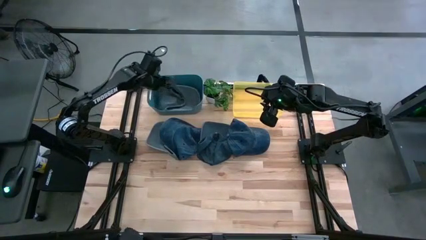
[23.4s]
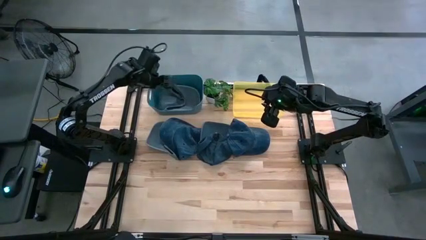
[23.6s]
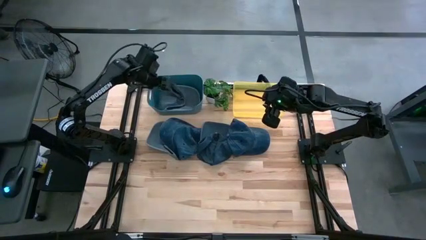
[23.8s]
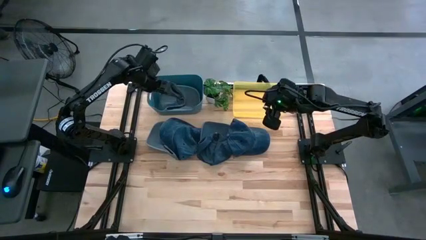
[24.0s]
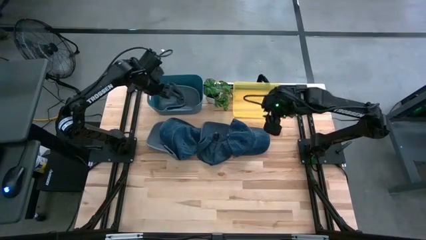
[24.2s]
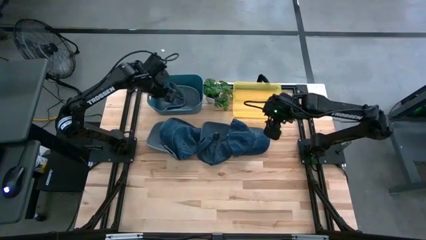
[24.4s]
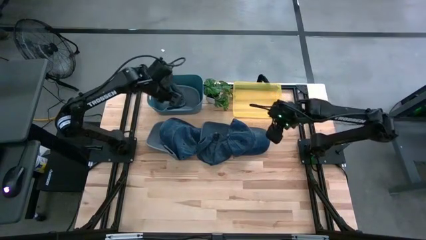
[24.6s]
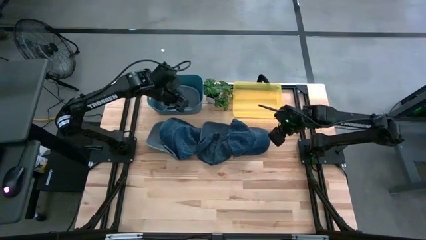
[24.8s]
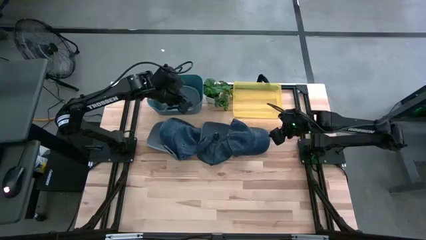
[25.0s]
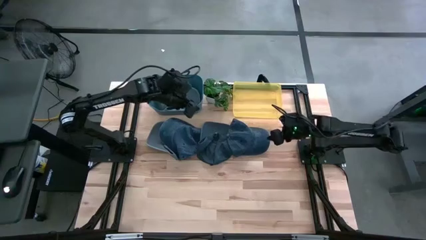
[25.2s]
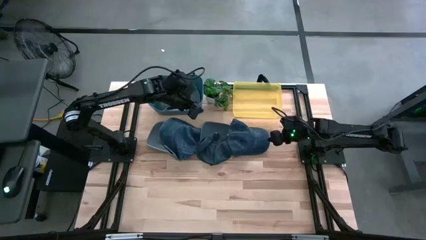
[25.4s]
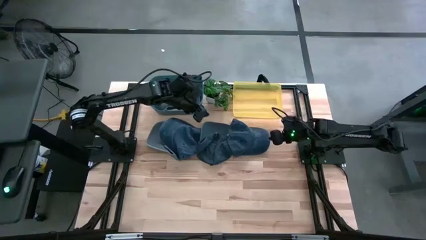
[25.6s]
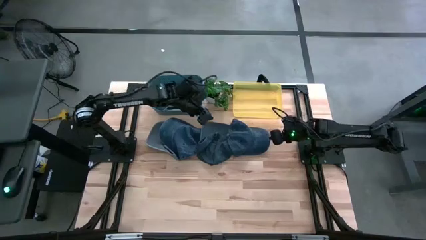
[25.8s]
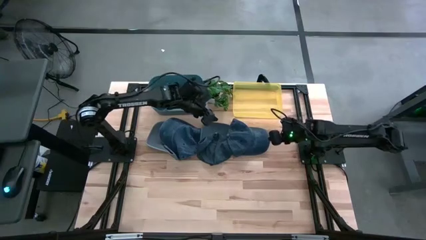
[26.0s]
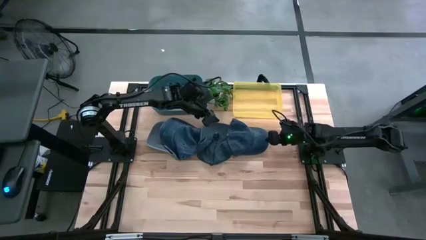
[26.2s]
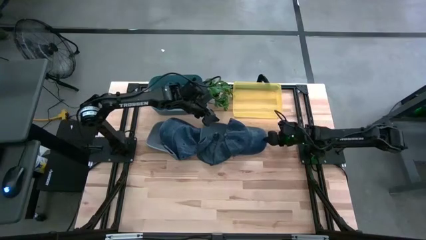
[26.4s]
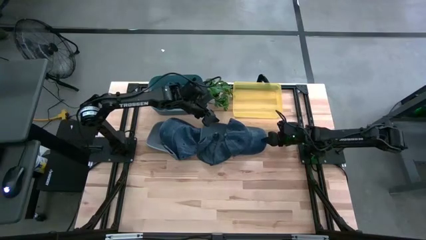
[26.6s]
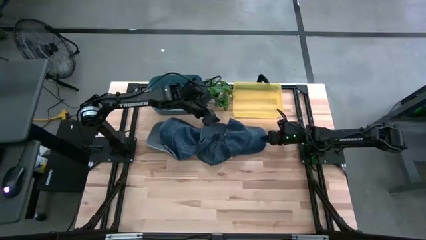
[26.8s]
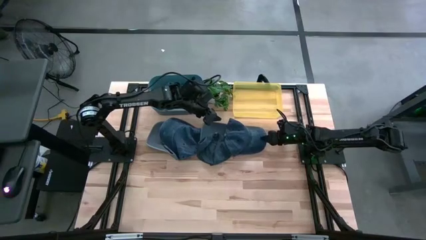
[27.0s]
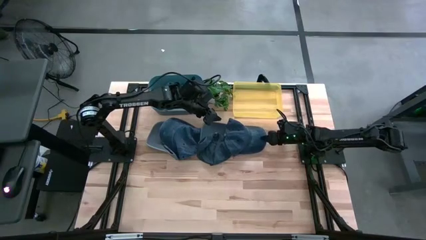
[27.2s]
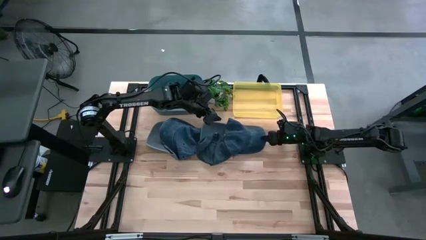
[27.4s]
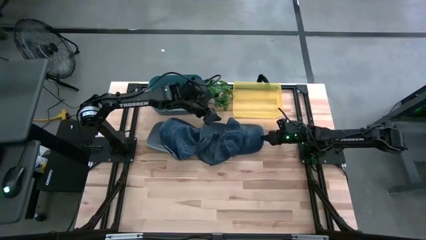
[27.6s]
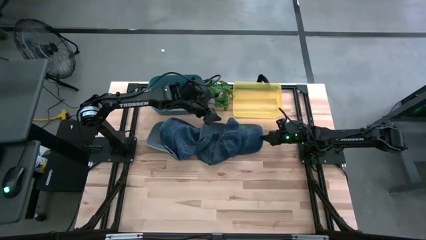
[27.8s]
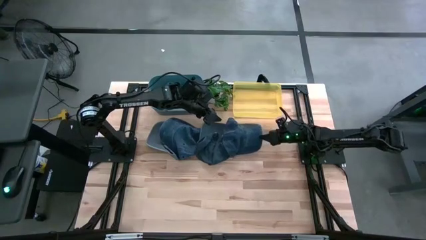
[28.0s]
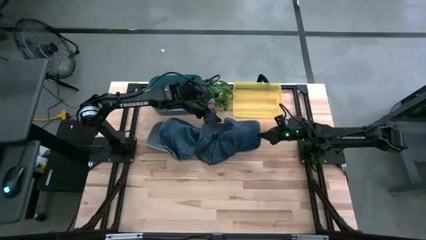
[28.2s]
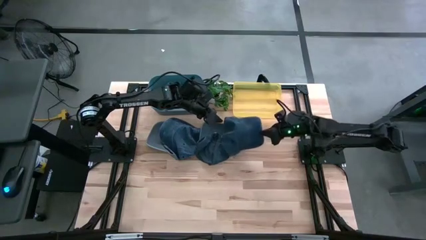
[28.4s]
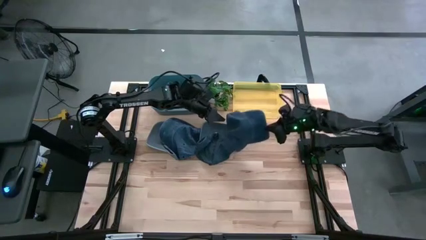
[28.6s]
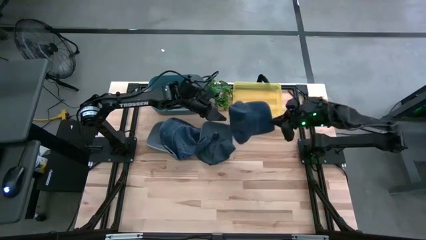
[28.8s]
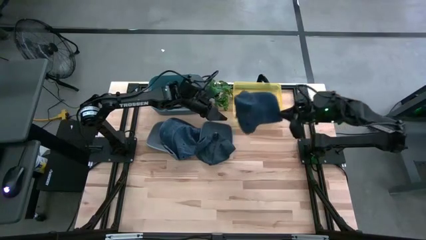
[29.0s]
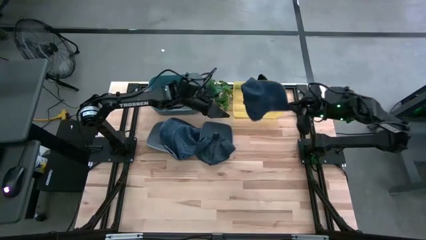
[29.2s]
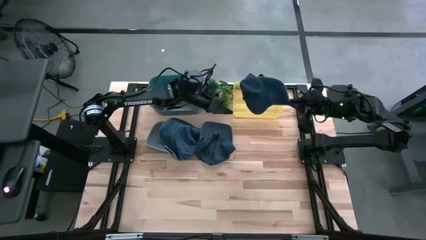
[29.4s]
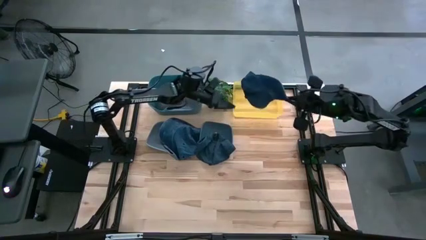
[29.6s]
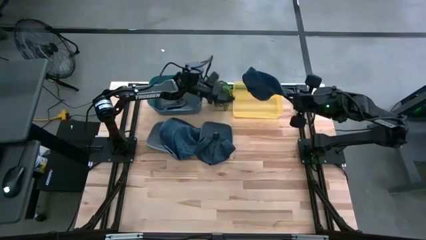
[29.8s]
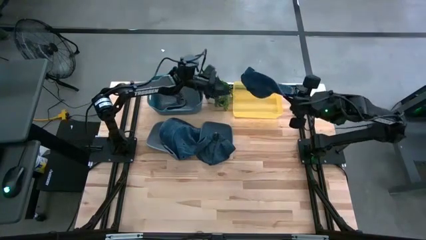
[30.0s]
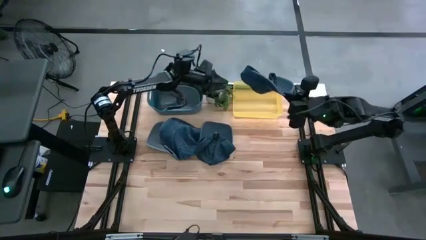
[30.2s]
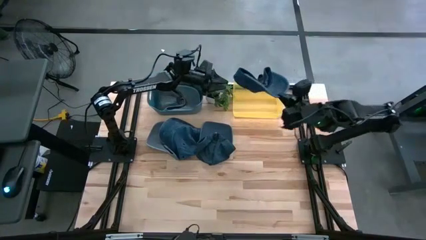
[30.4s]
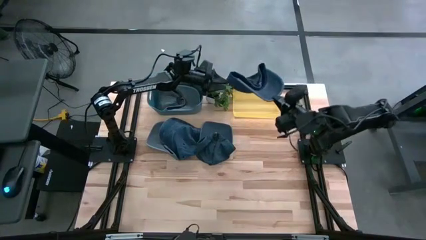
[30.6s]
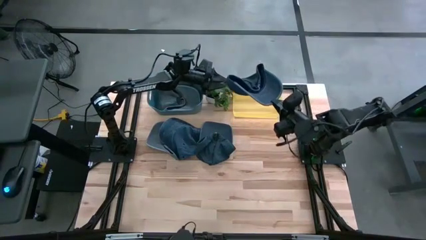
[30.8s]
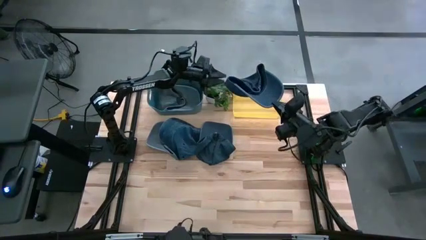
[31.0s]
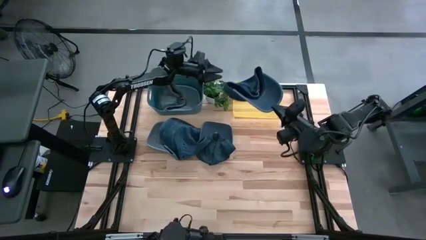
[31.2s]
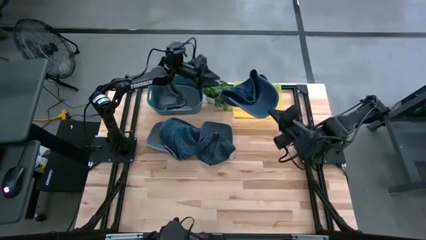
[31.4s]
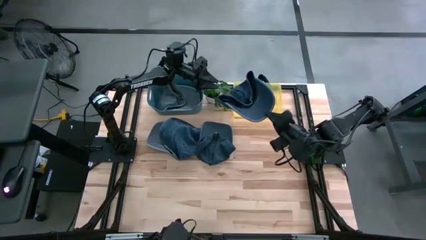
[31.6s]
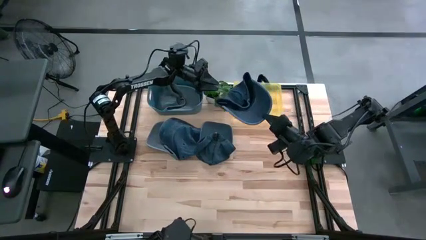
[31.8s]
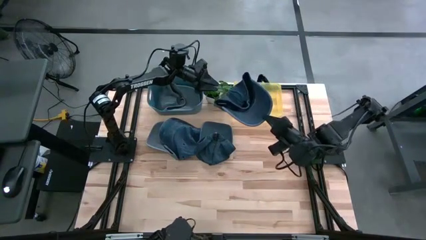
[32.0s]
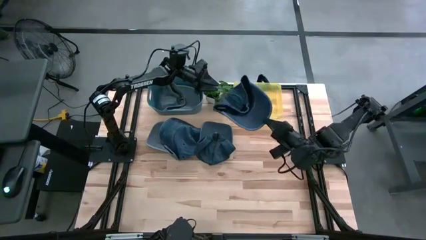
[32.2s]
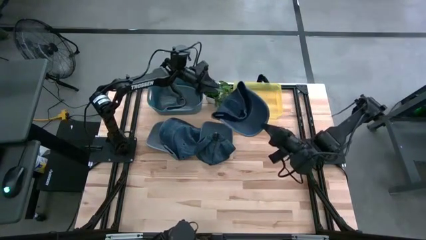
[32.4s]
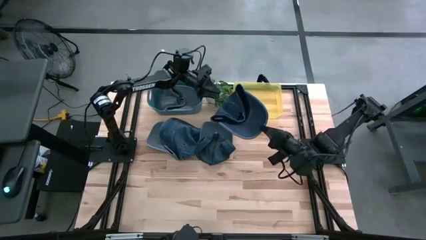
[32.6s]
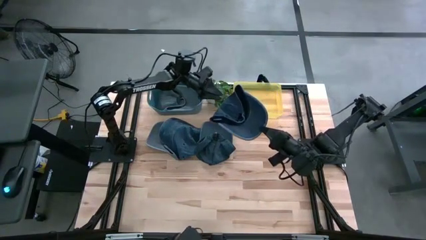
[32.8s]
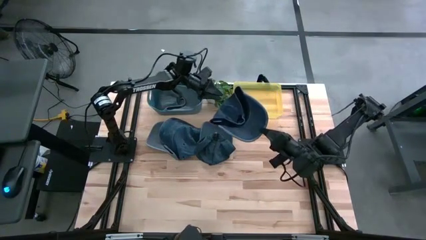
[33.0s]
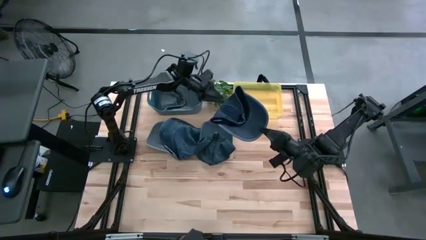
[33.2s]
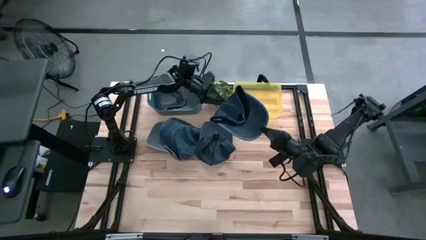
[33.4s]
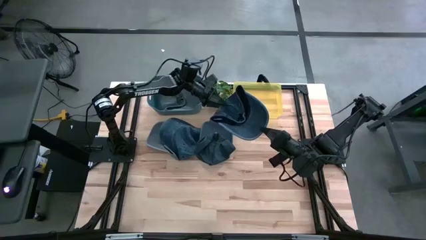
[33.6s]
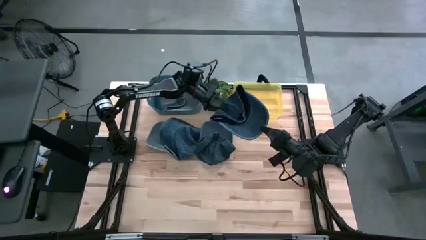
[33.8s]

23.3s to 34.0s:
Task: Pick & Place hat
Put the right blue cap into the yellow bin

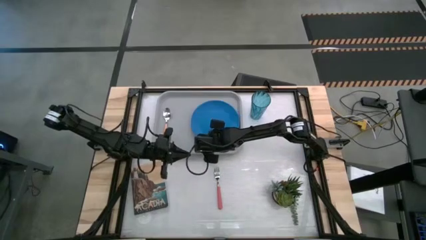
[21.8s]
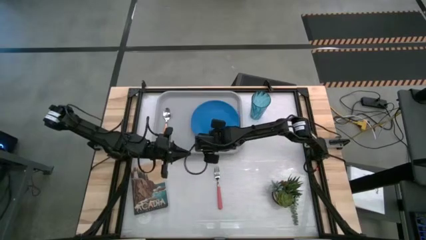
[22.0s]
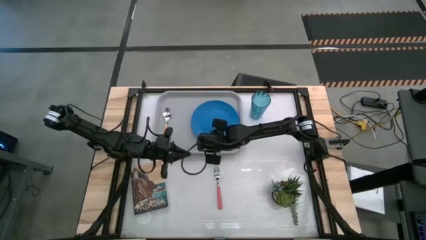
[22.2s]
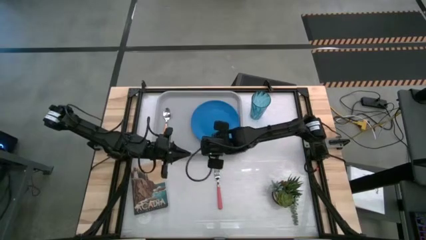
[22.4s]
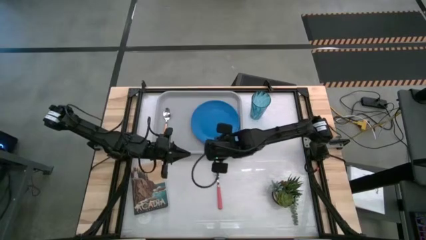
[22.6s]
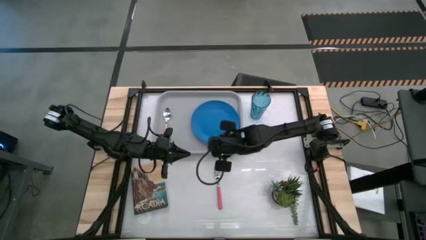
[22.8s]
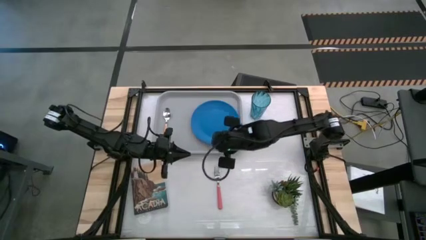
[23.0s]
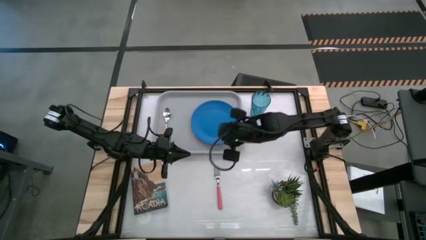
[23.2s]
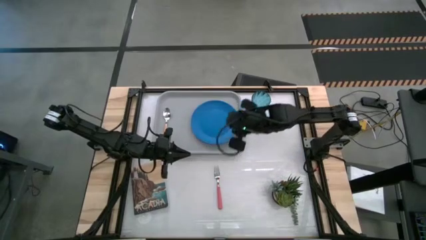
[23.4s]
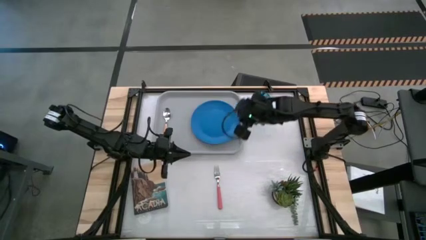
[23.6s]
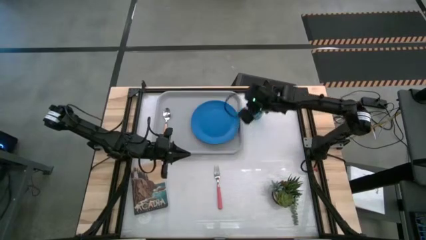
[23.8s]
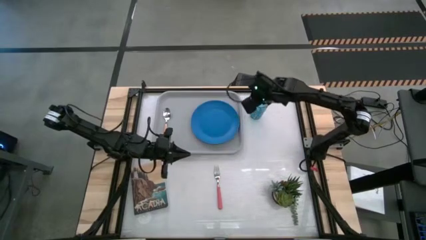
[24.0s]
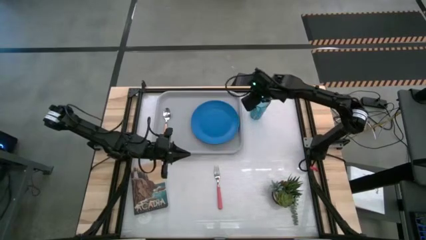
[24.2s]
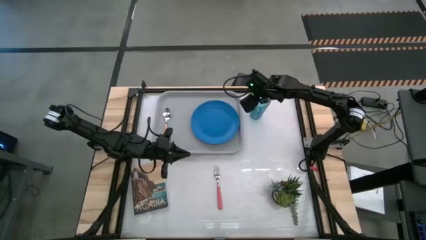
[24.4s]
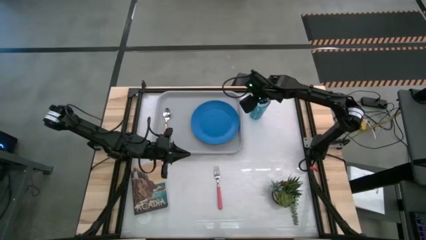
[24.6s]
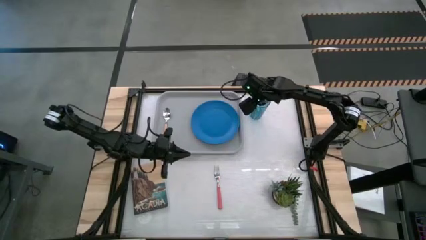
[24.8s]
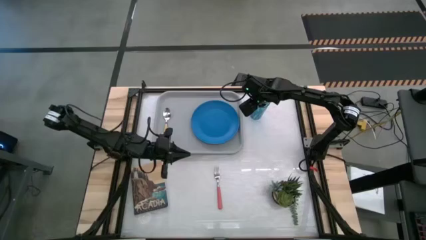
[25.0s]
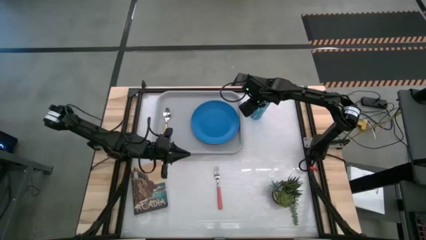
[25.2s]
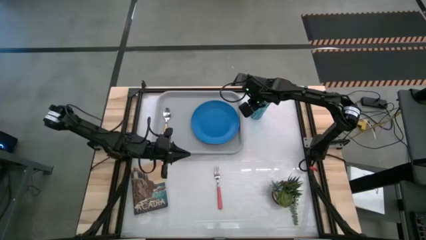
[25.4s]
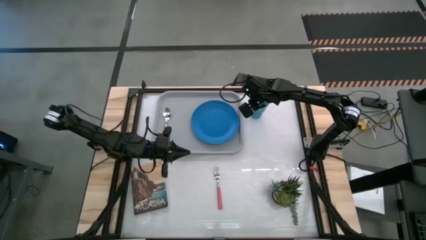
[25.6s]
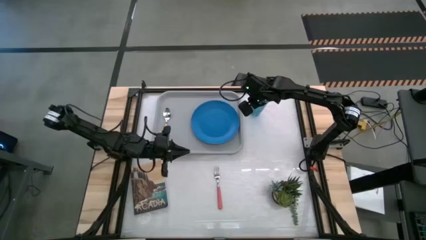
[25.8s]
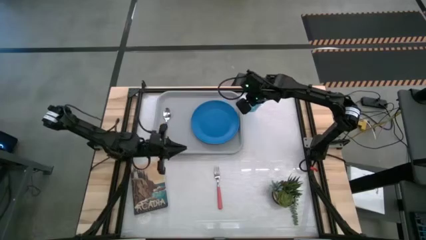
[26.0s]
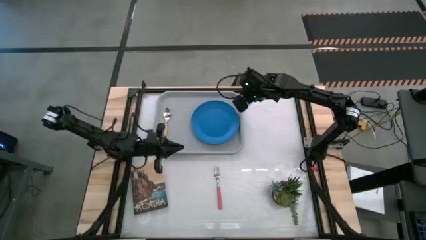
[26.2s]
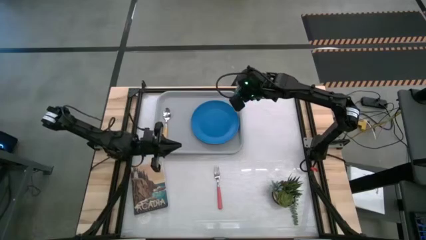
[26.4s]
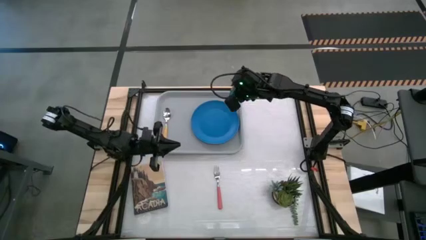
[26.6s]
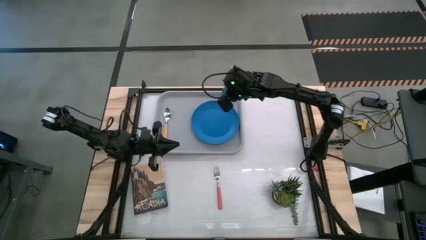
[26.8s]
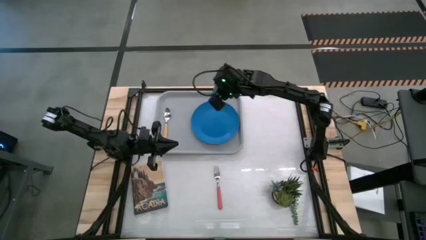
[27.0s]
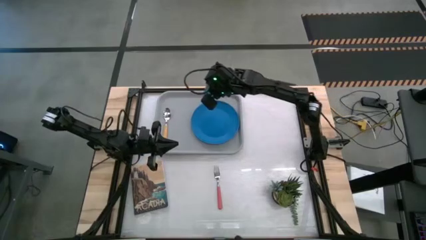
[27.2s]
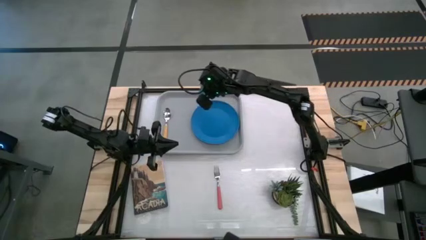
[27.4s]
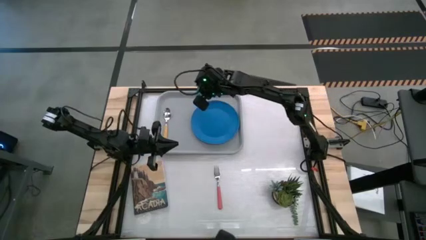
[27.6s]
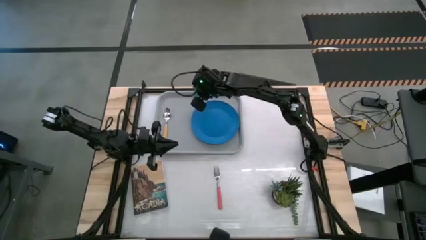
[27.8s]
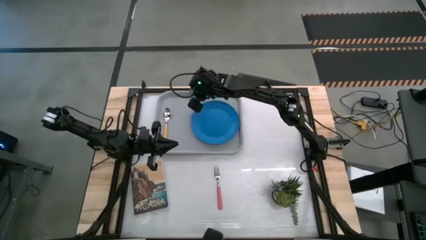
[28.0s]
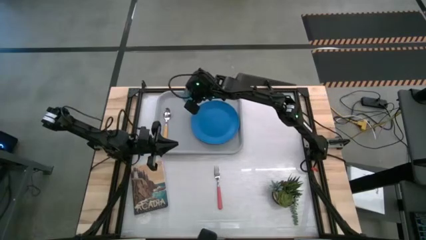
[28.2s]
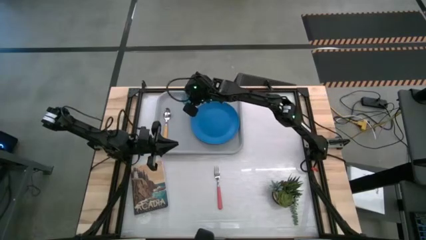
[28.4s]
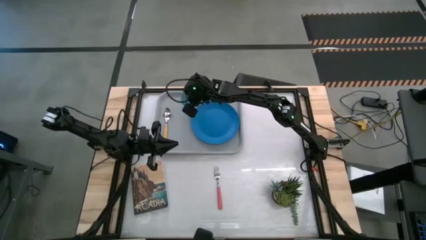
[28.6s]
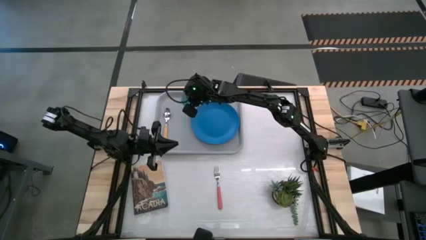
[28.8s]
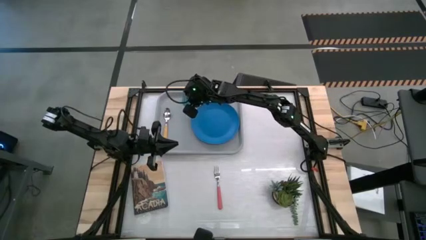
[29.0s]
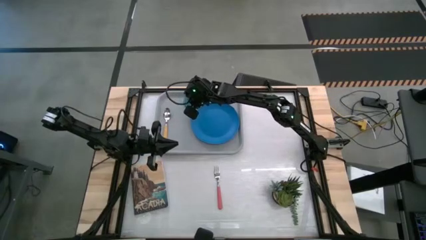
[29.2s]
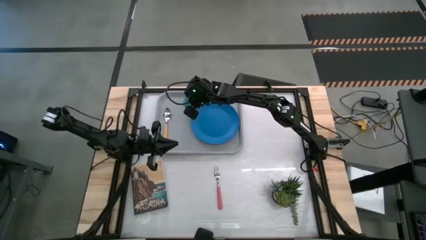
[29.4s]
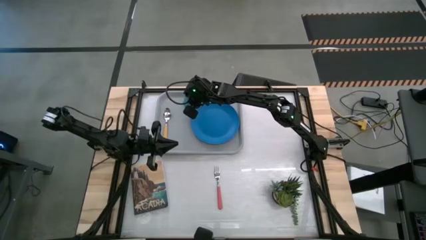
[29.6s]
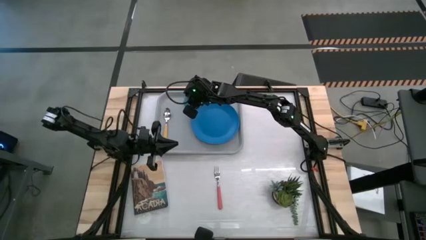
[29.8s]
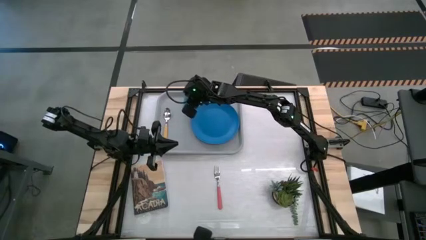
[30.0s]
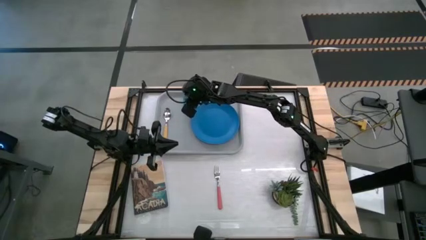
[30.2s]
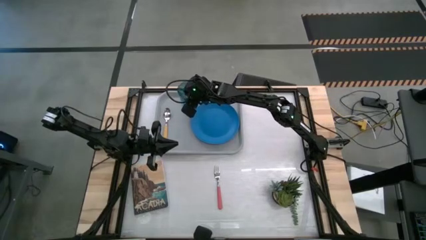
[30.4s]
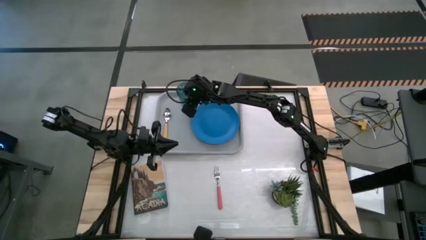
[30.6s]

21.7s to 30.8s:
Task: Pick and place plate/cup/fork/spoon on tray
Put the blue glass on the gray serving tray at the top left of the blue plate
